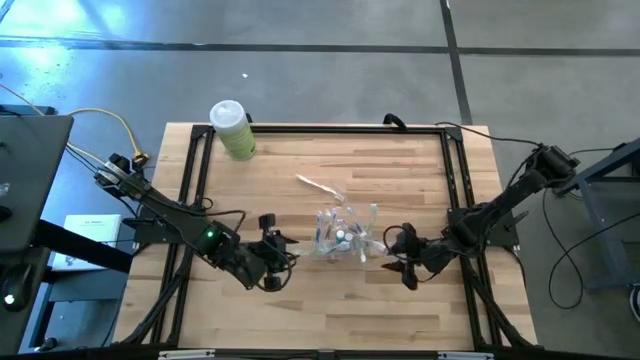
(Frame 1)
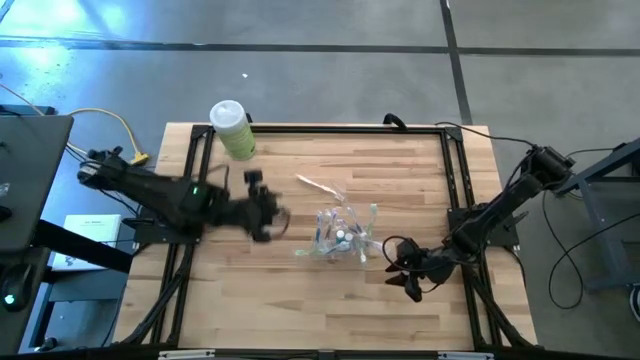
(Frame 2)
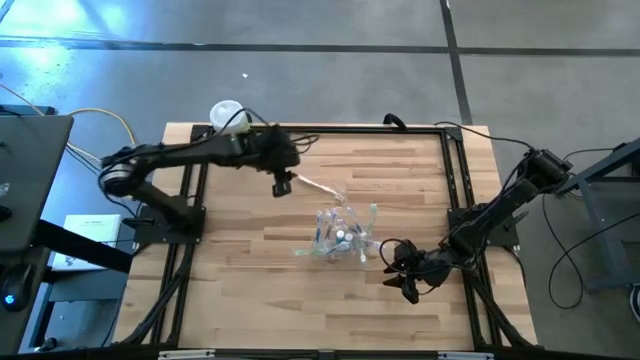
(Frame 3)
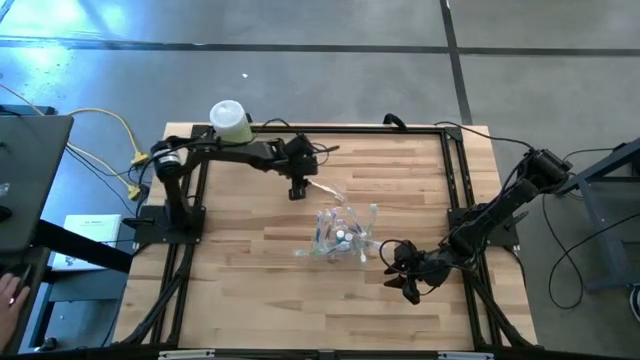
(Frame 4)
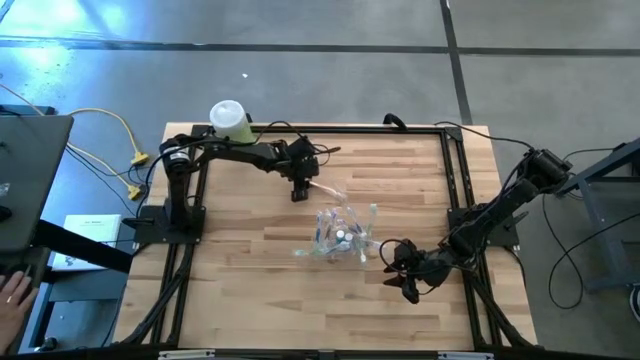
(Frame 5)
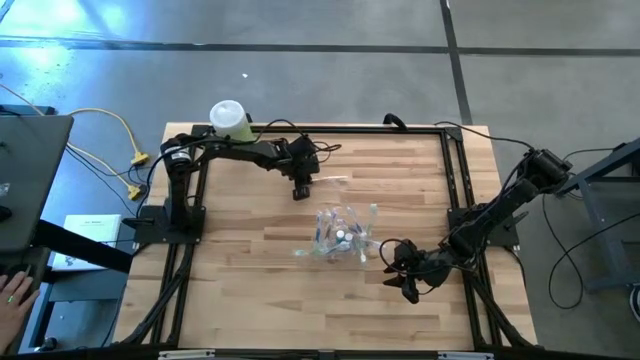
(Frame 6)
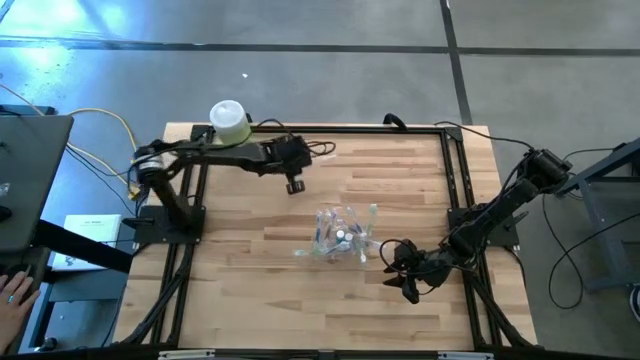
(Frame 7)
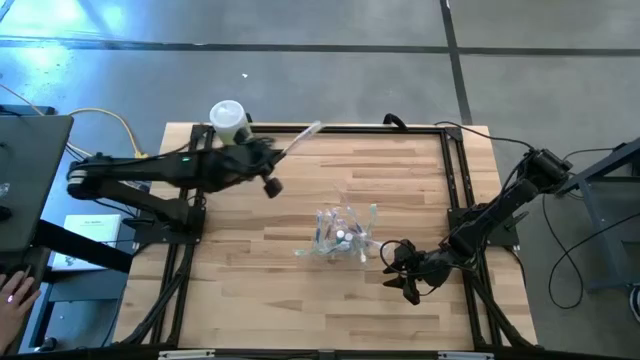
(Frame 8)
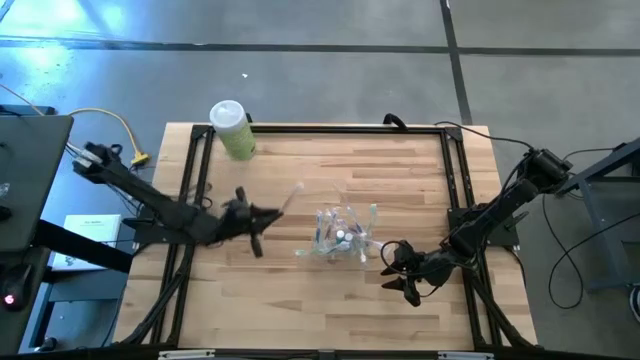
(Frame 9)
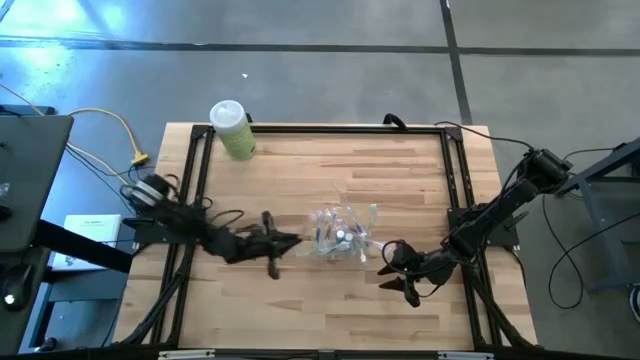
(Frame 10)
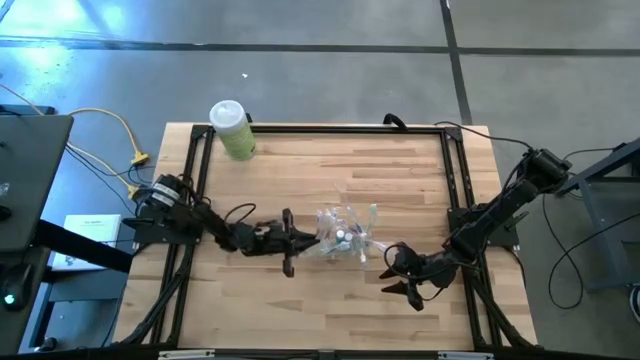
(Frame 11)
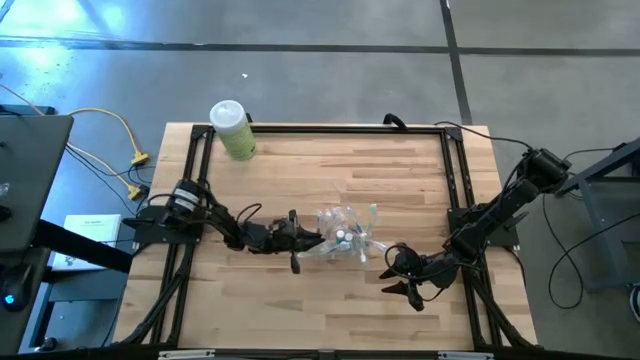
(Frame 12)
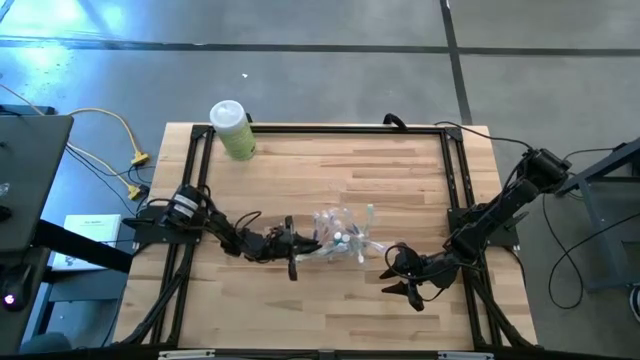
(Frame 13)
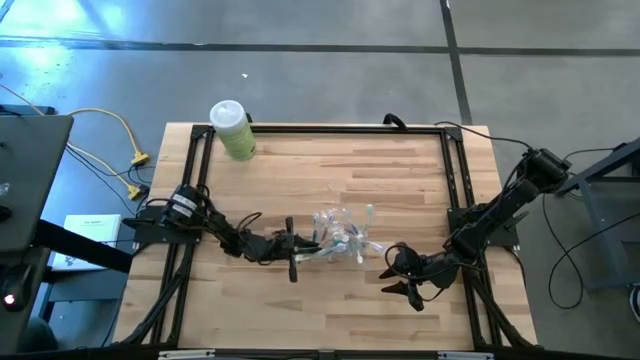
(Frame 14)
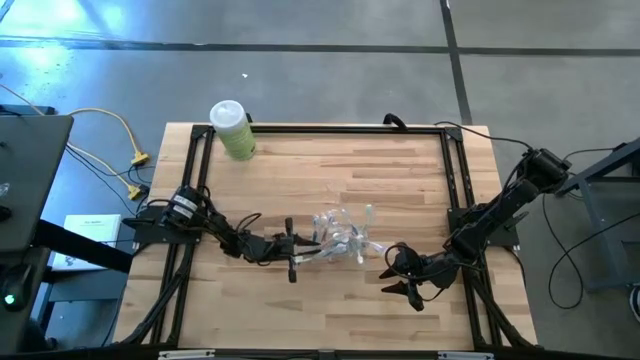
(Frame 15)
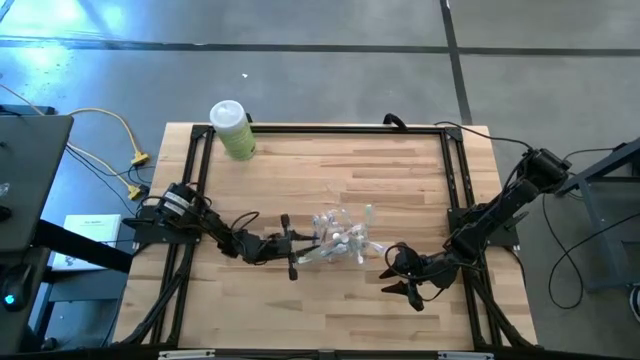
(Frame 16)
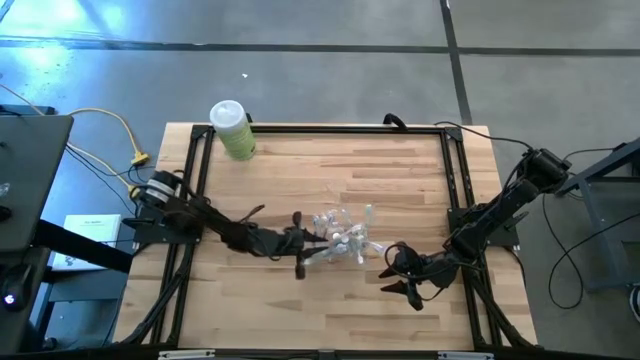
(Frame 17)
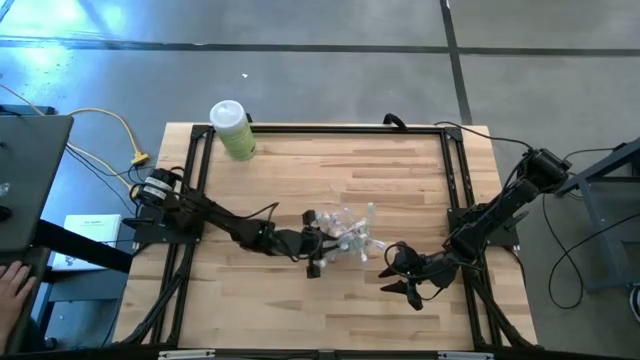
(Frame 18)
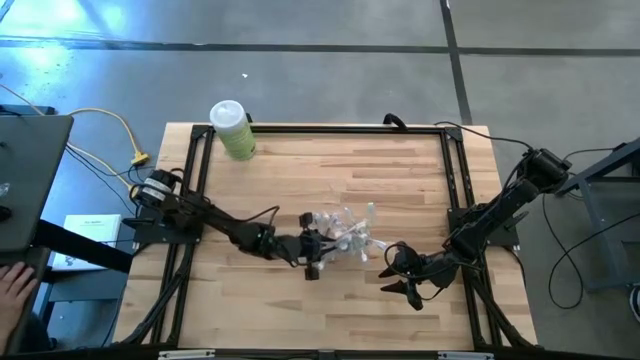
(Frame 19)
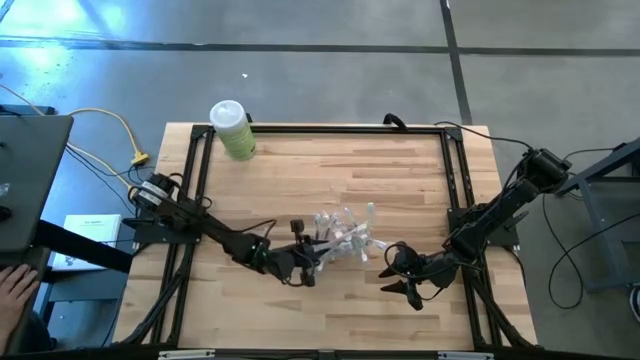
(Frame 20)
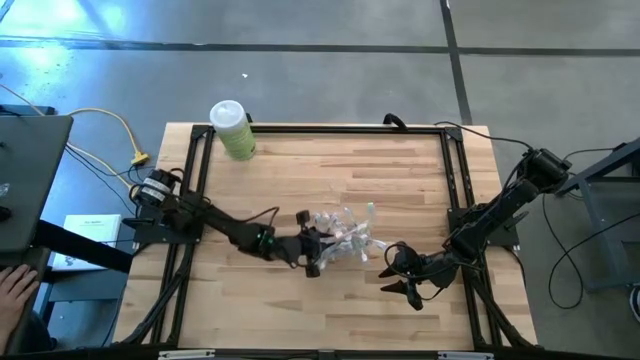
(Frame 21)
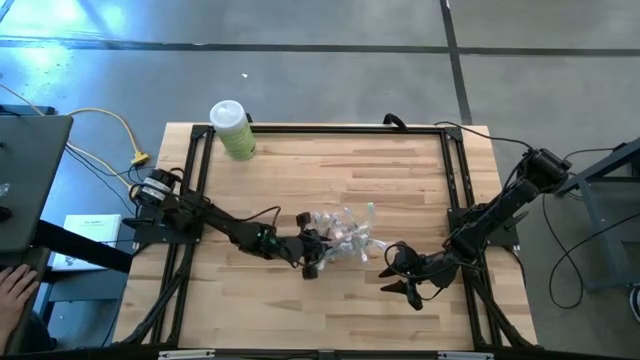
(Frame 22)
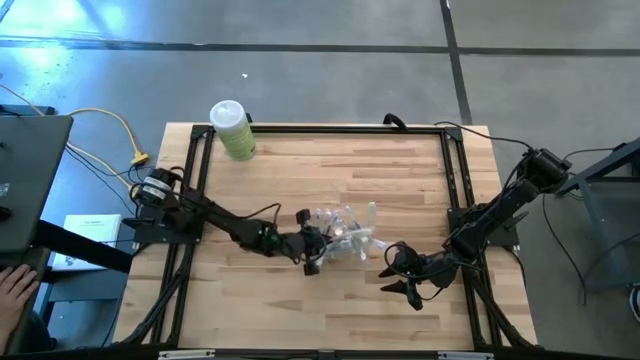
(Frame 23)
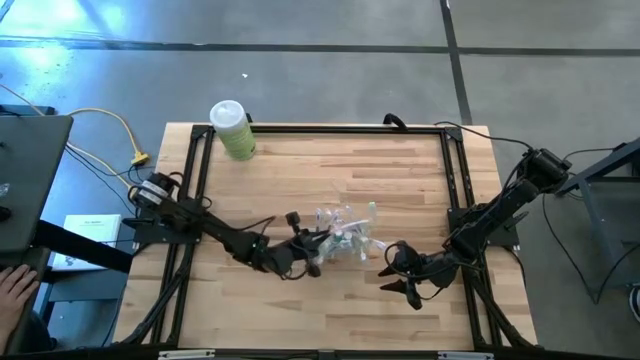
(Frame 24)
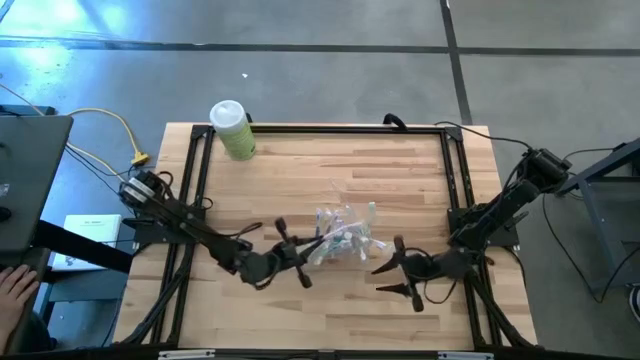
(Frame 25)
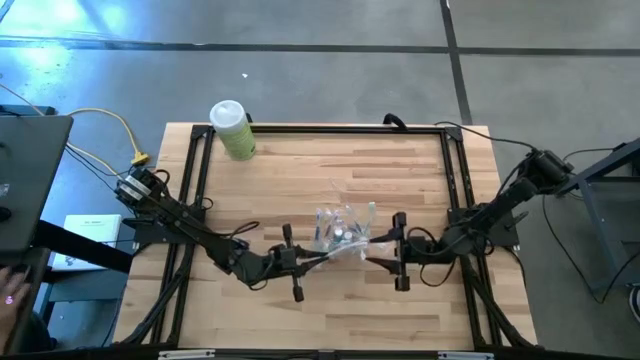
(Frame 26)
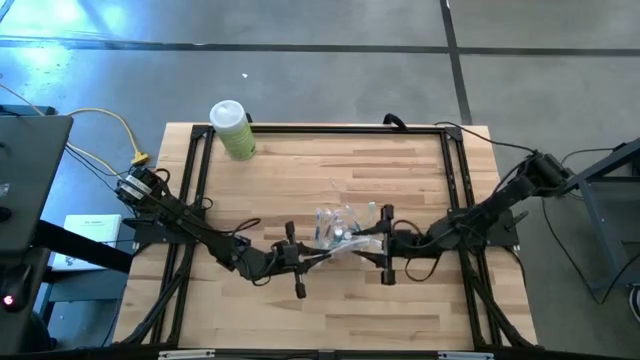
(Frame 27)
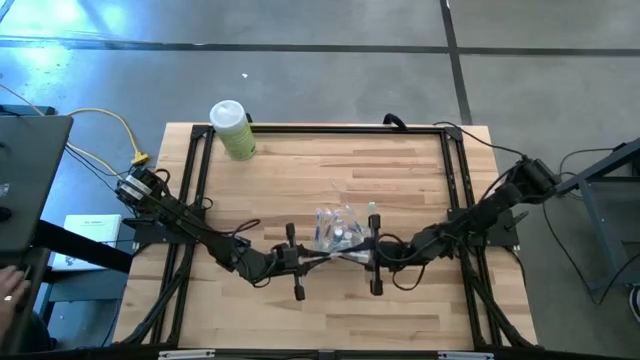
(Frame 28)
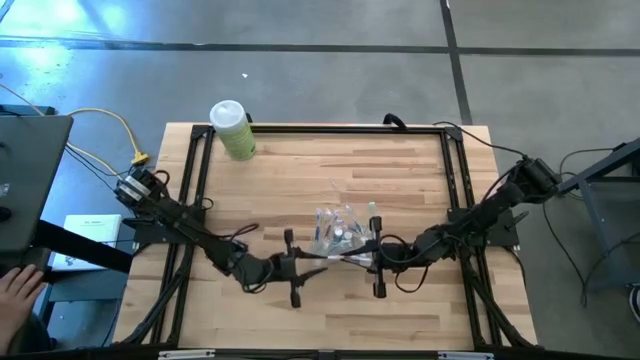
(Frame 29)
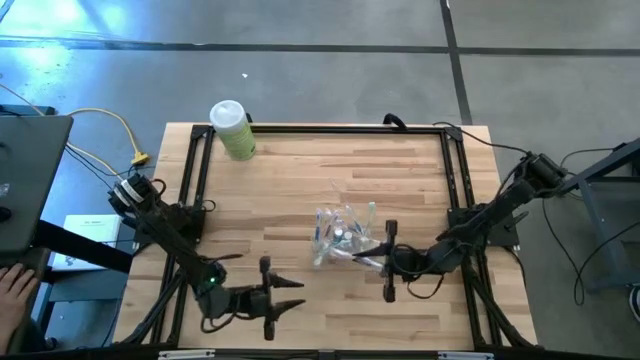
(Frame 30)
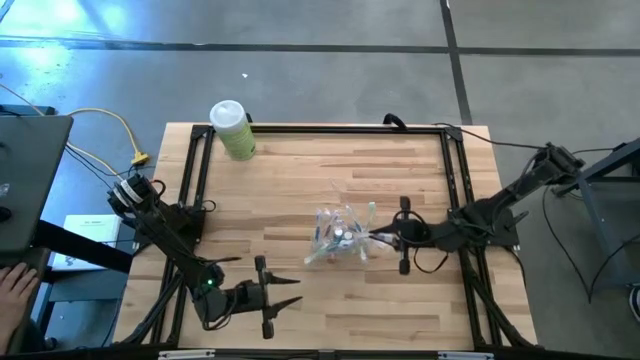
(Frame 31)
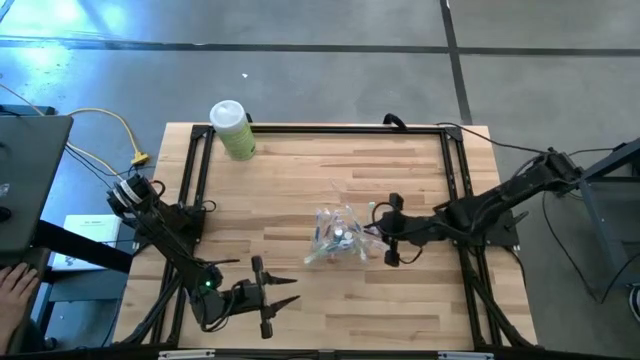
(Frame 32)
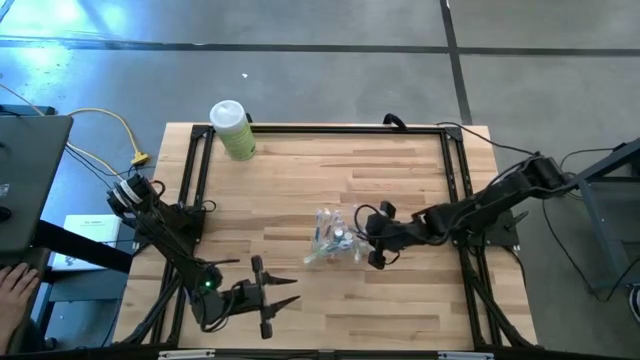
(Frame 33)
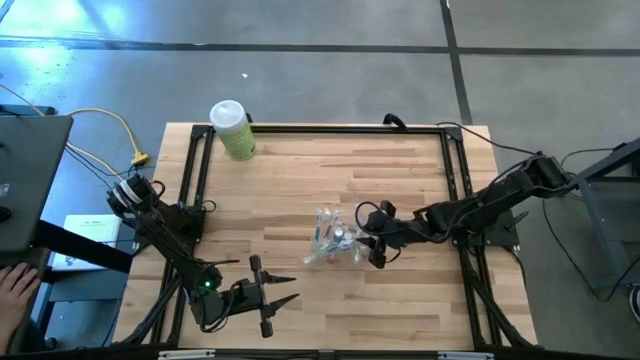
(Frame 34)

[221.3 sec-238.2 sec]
Task: Pick & Place toothbrushing station
Put the orange toothbrush into the transparent organizer

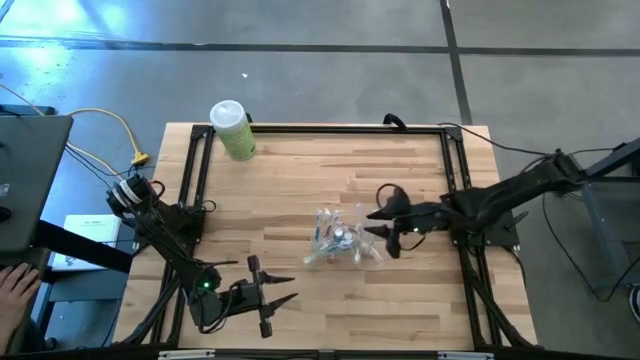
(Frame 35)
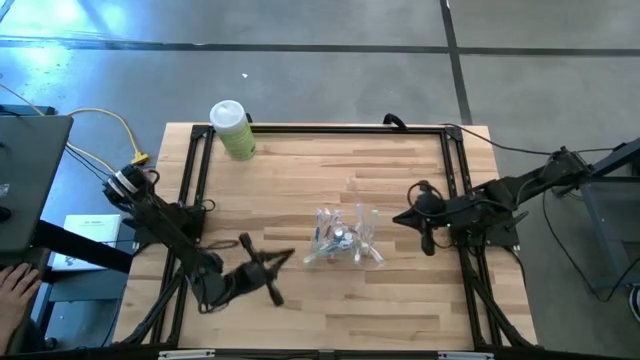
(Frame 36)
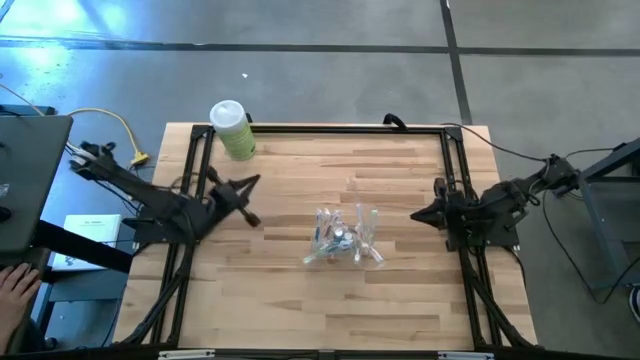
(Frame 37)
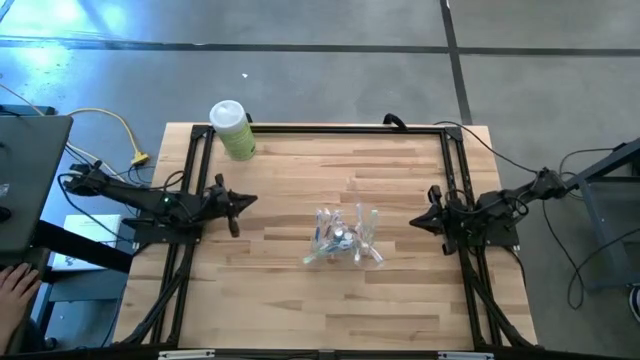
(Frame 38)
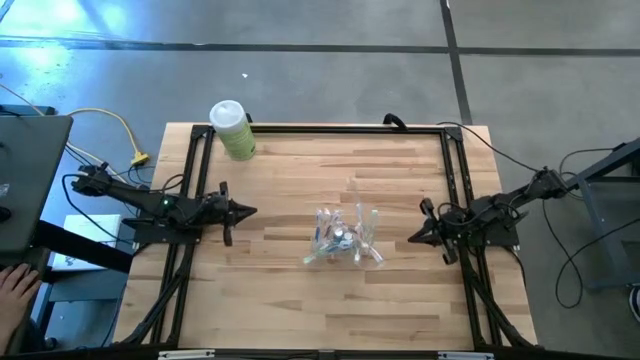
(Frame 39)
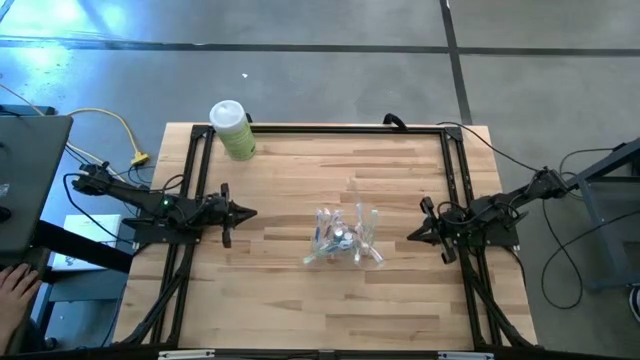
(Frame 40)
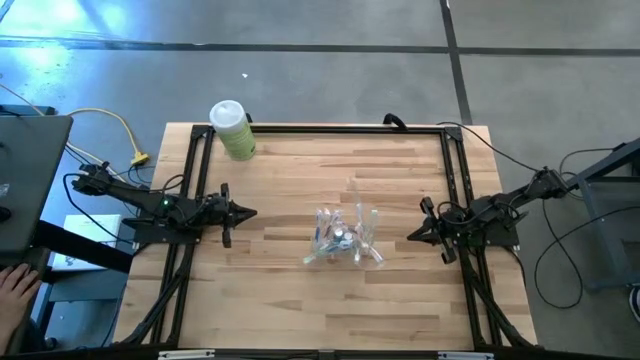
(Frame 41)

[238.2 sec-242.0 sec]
Return to Home Position
